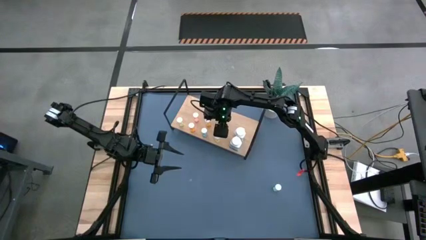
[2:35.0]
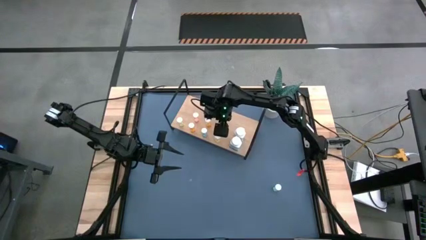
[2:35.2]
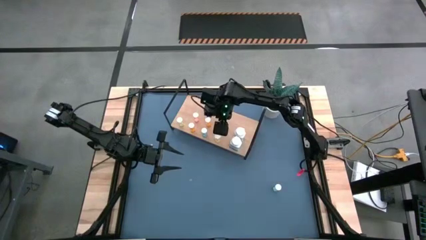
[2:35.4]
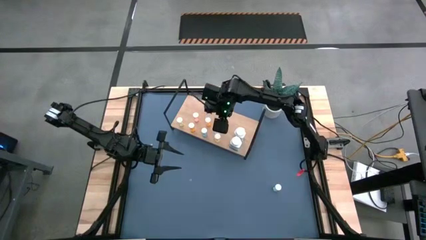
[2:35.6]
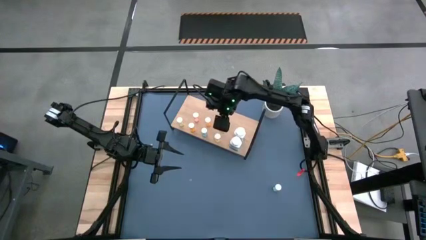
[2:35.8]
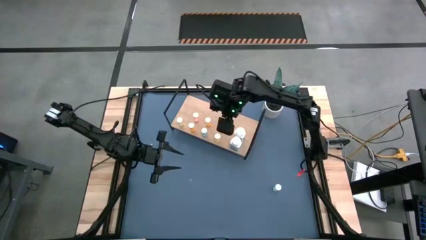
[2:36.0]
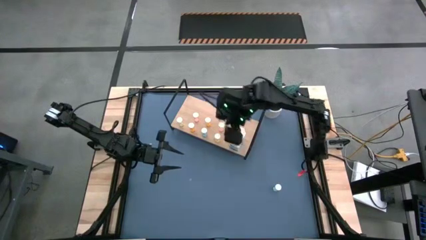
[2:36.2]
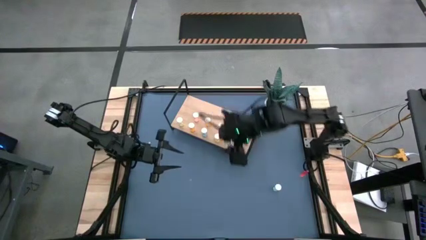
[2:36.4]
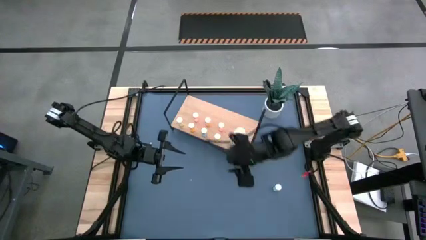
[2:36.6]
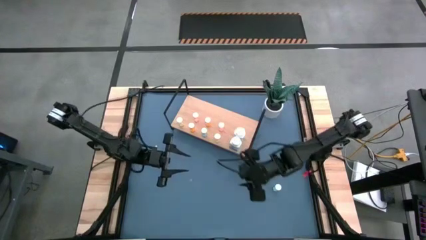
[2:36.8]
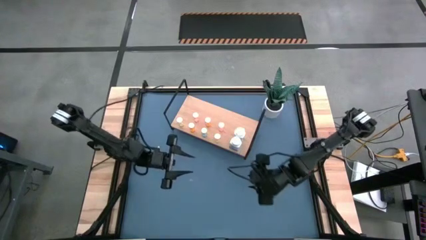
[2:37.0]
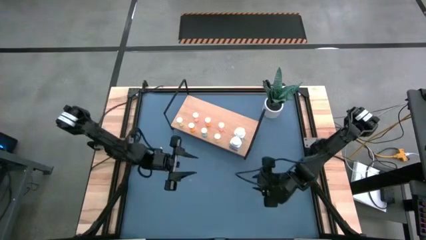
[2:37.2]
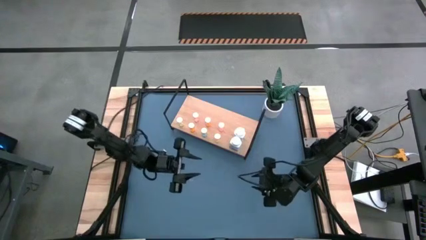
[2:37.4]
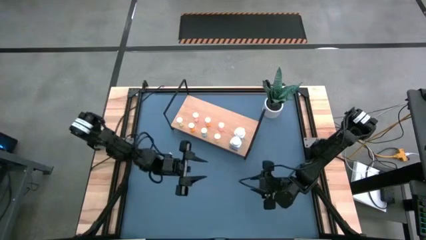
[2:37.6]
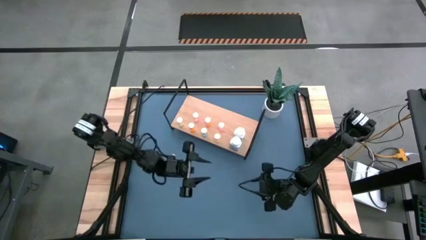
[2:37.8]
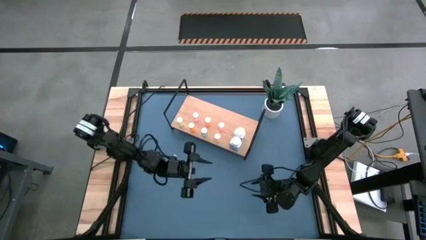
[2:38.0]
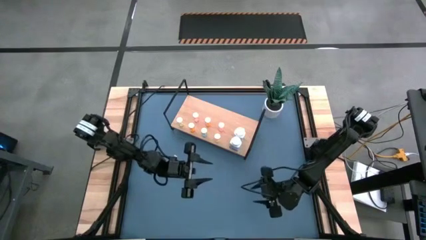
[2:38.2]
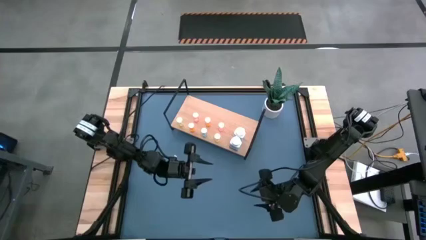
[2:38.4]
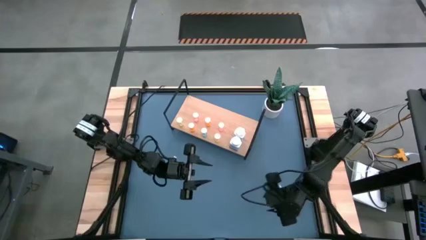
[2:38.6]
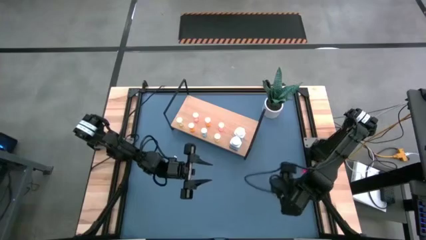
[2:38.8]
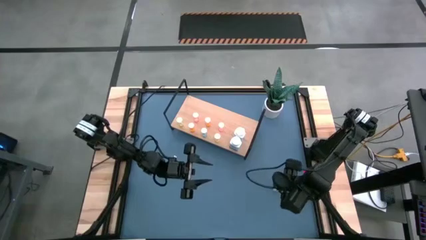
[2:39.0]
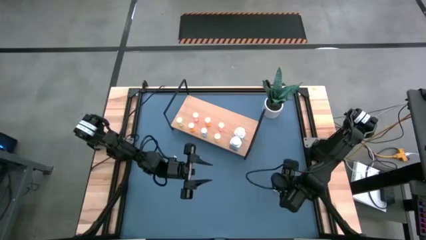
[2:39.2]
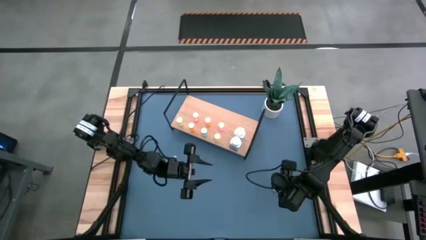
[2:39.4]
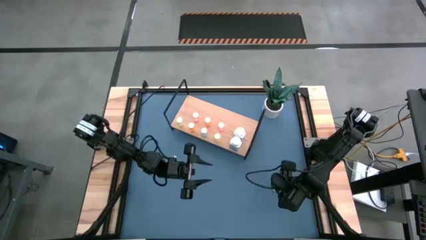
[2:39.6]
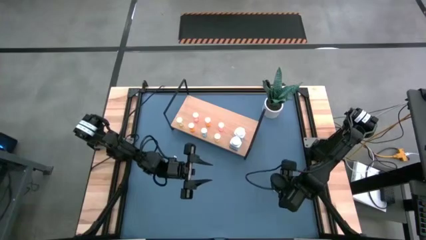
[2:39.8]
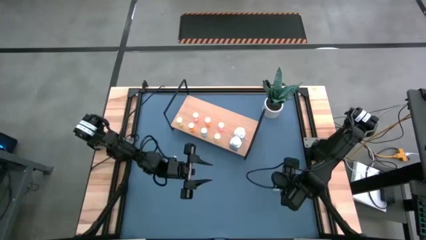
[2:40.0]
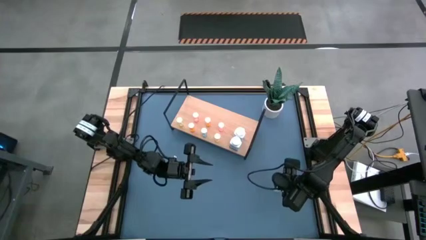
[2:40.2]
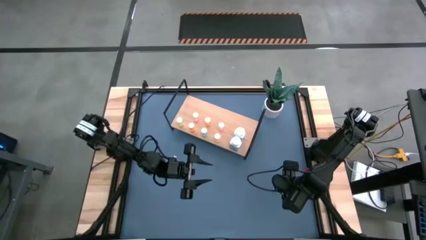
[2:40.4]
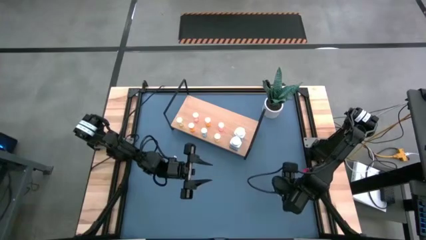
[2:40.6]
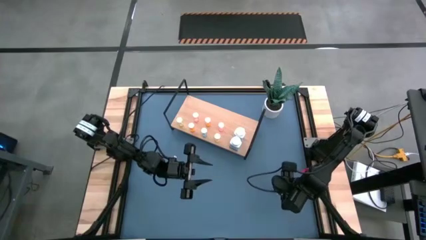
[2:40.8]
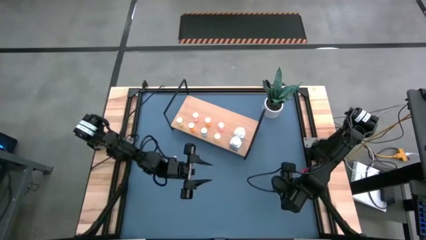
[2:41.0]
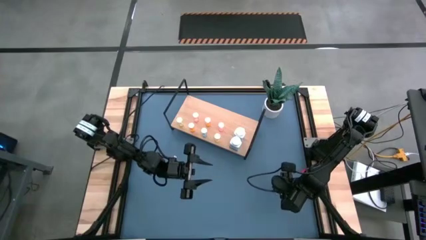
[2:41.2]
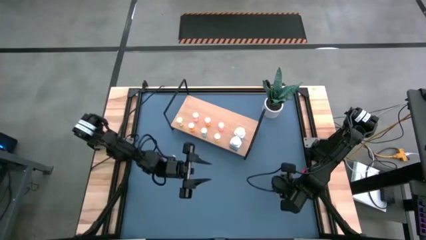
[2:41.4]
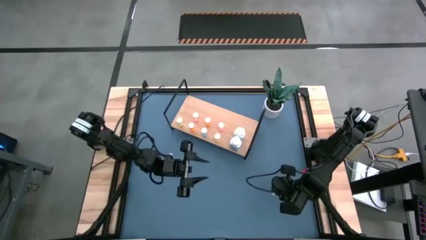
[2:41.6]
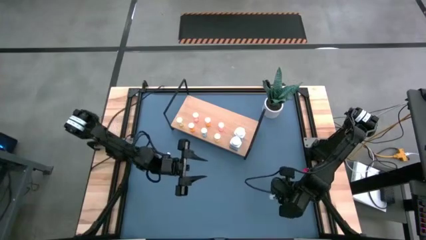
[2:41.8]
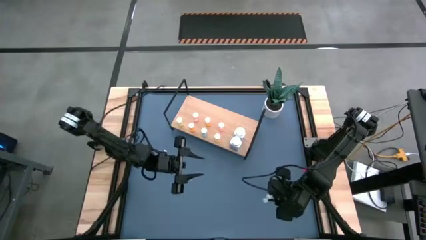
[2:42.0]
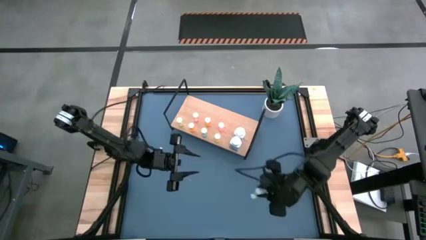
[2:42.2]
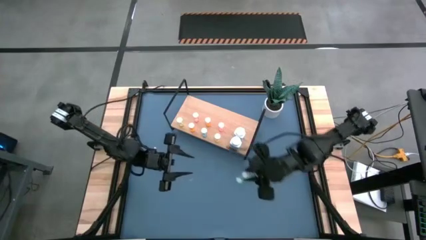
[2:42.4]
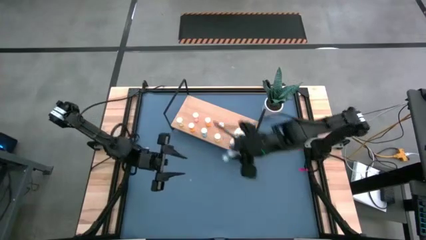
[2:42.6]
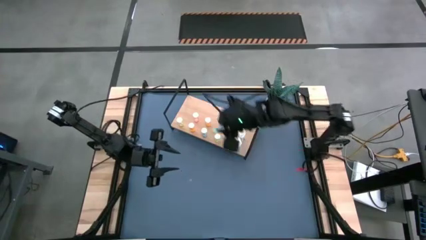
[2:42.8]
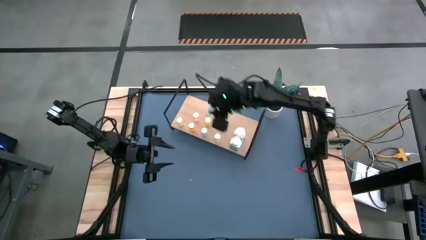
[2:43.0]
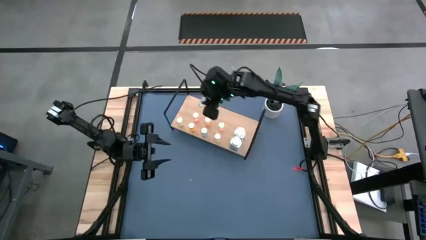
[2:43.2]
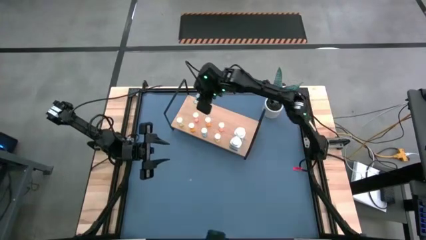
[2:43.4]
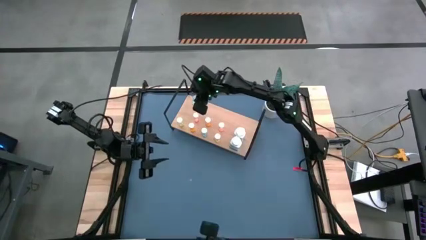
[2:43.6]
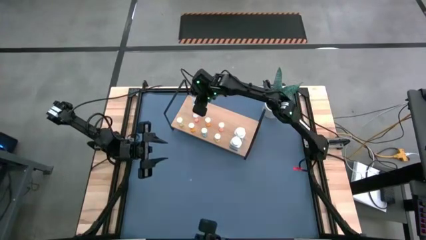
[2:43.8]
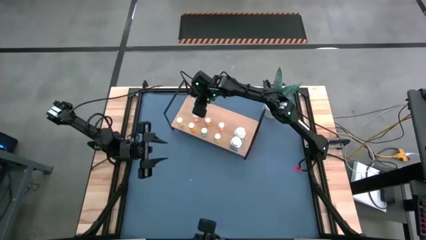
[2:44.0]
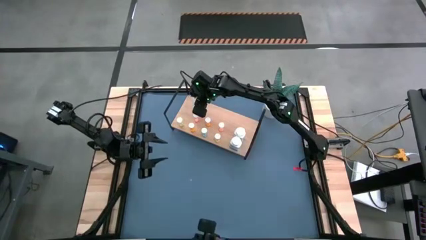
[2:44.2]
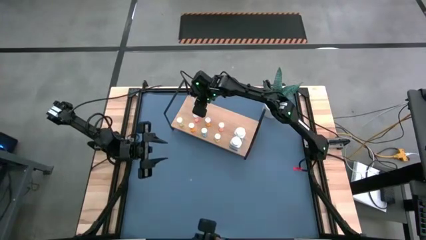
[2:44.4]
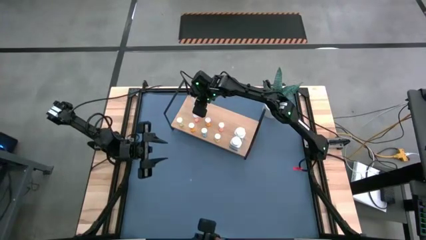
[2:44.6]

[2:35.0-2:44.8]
Task: Pick and place medicine bottles onto shelf by color
Put the blue pill bottle on the shelf

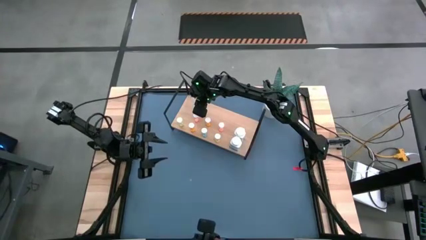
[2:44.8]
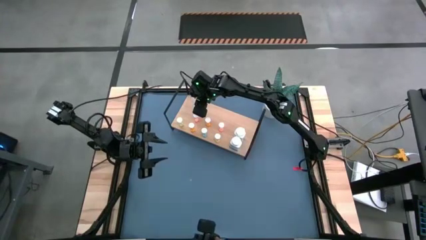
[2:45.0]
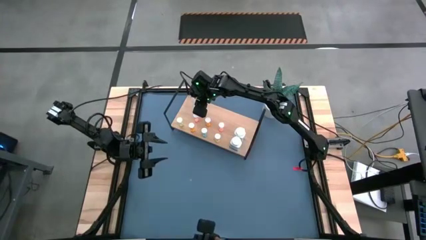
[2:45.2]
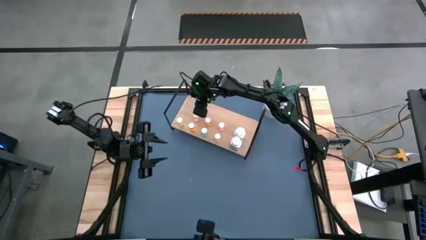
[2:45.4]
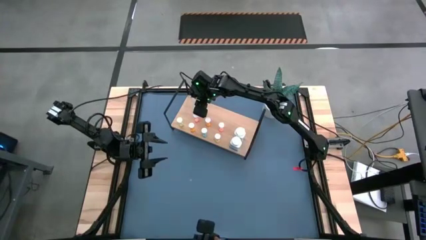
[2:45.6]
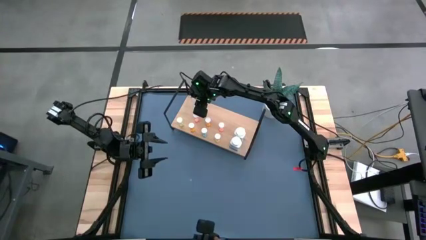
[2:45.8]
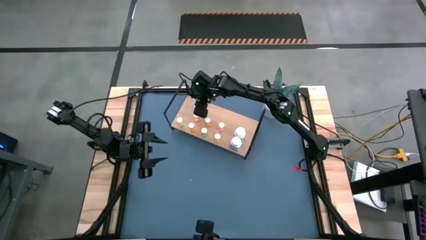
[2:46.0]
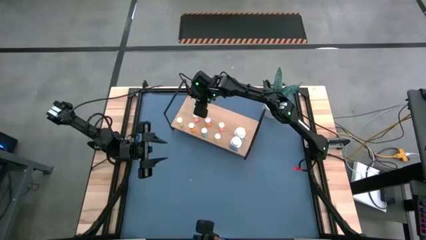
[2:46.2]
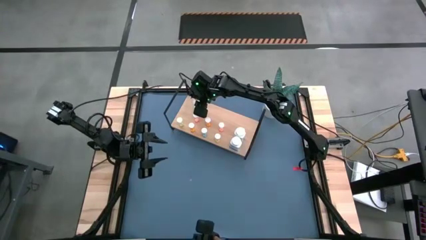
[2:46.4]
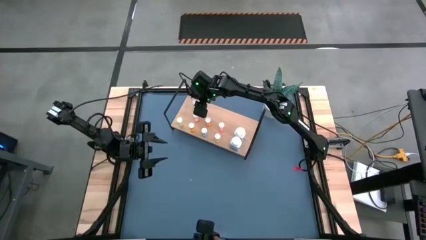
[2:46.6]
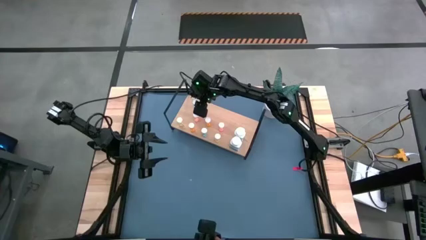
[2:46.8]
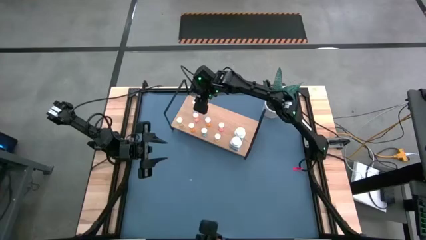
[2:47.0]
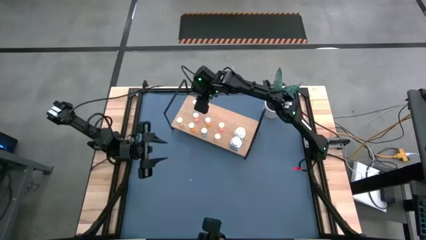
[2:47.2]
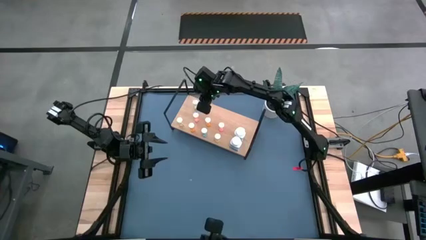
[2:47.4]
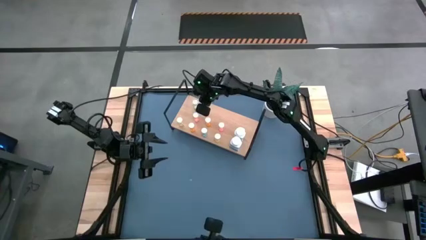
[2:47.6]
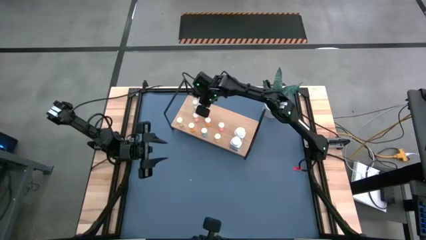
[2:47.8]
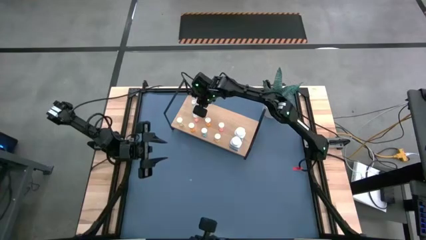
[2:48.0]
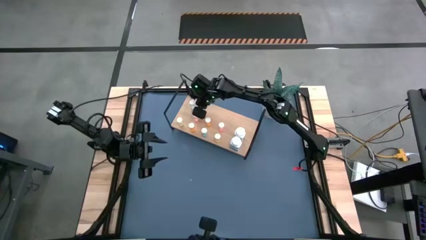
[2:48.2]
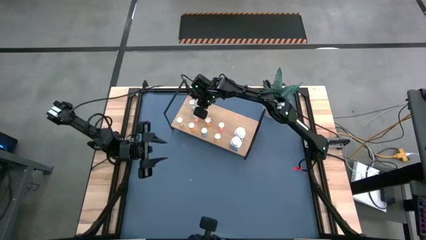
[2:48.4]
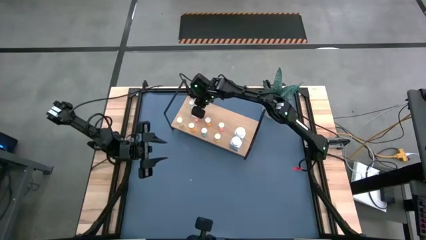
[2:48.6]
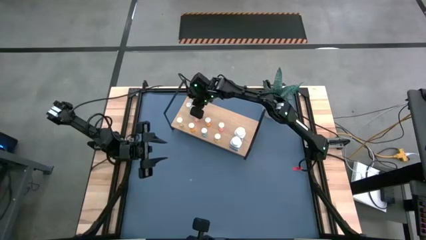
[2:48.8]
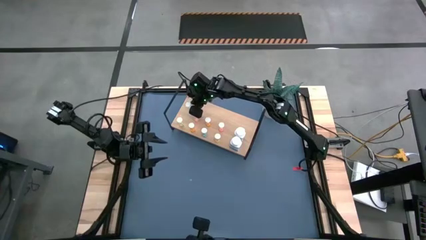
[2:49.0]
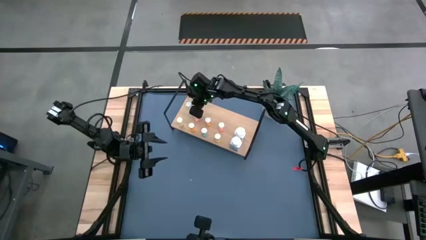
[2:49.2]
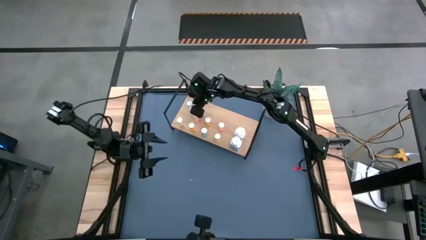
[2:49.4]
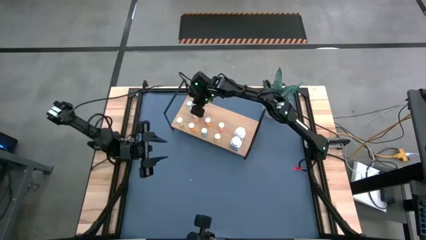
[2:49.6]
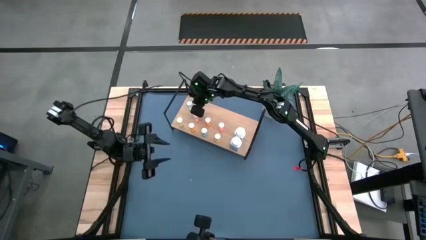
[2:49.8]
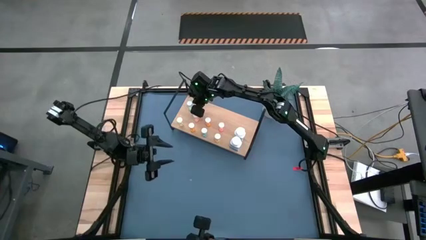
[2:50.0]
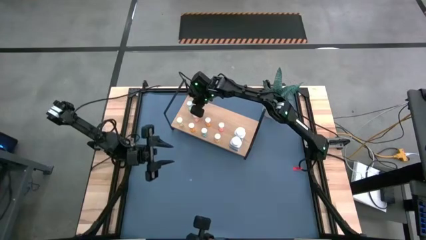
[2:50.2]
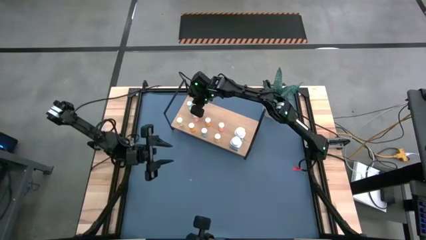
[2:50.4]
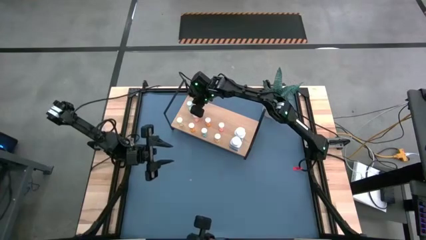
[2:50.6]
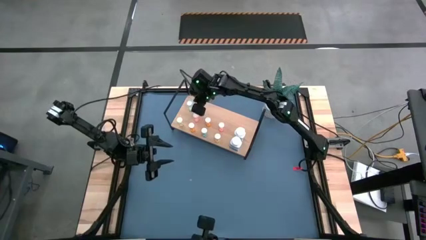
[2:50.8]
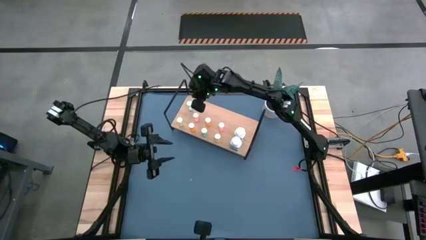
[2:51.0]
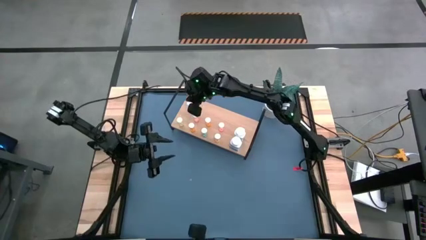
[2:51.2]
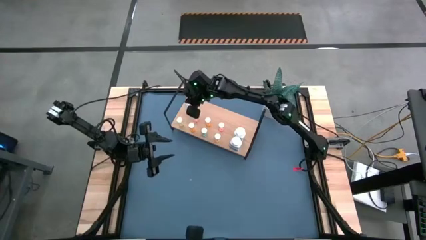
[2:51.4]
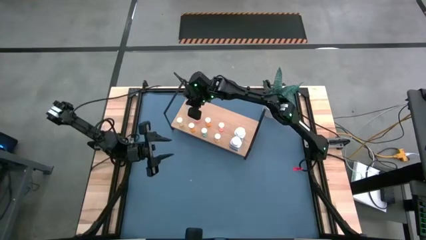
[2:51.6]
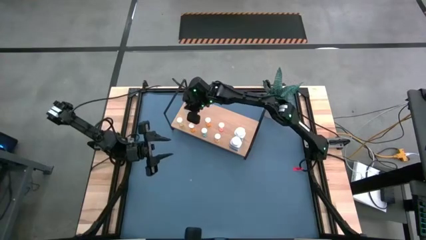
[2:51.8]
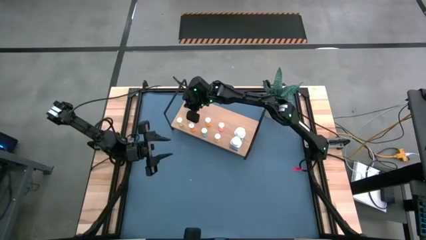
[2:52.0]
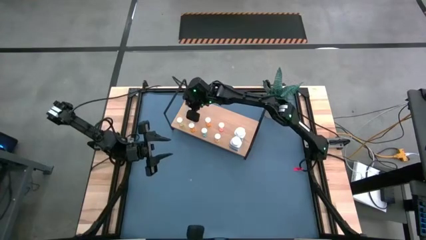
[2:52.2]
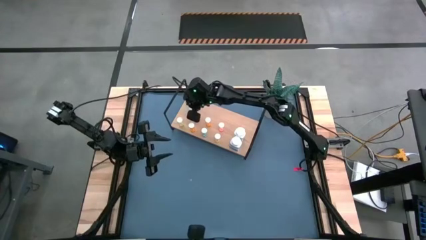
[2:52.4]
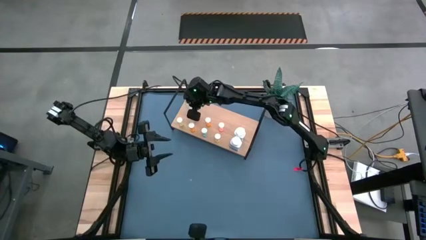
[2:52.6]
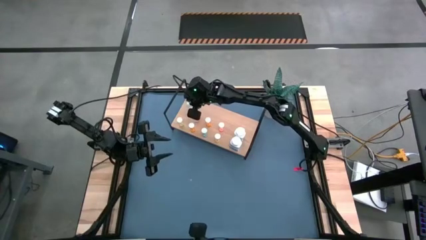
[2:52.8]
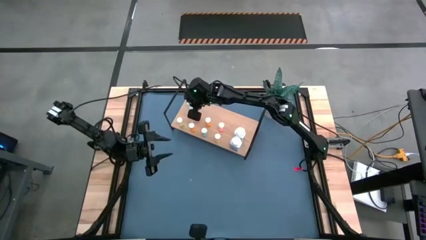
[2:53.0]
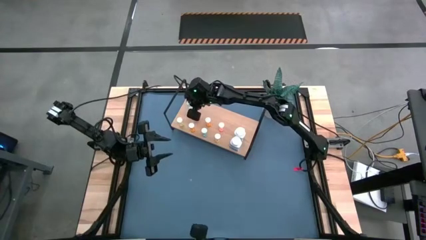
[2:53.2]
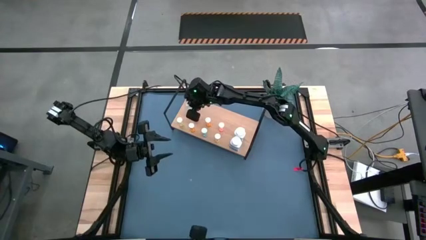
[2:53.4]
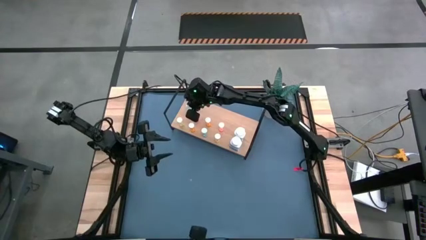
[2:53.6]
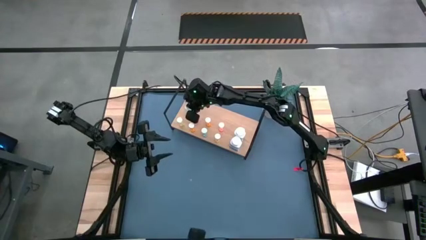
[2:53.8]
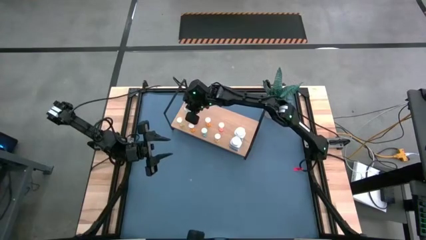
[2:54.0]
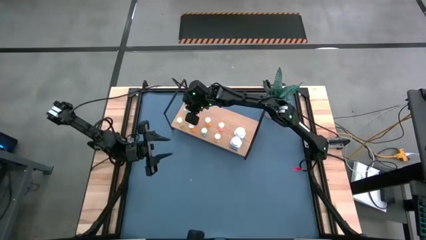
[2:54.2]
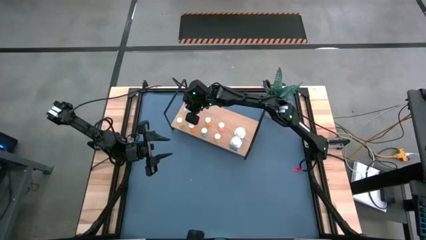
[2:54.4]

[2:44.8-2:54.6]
Put the blue pill bottle on the shelf
